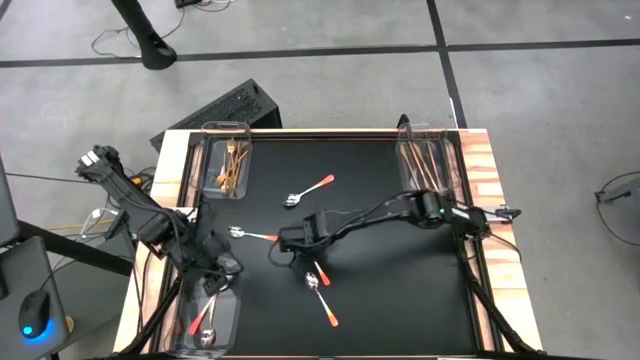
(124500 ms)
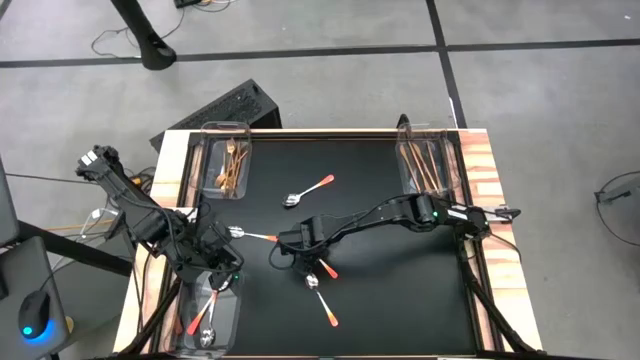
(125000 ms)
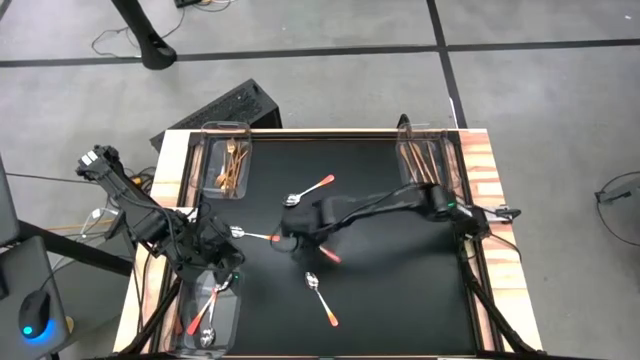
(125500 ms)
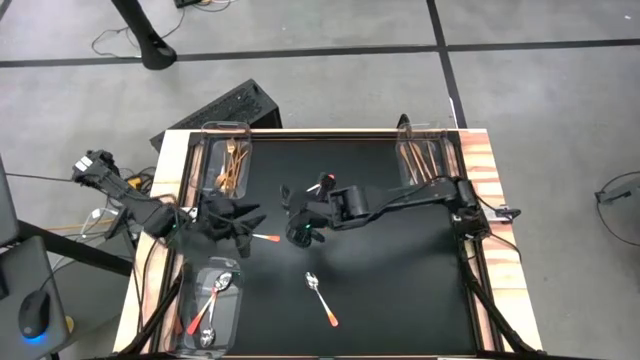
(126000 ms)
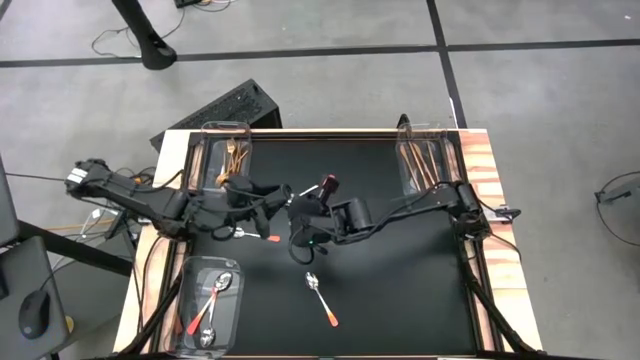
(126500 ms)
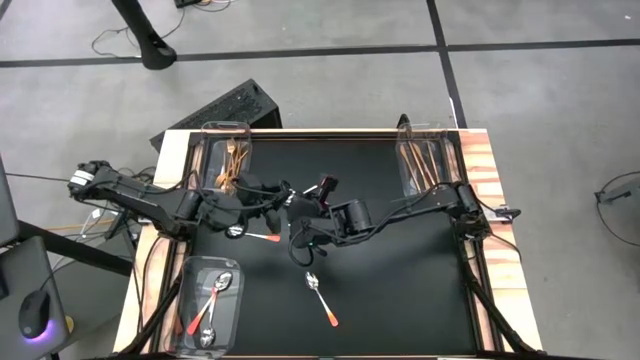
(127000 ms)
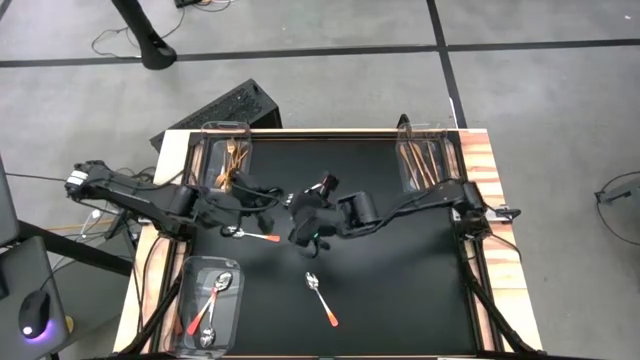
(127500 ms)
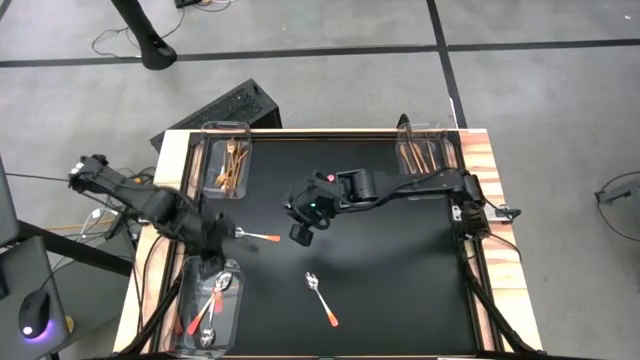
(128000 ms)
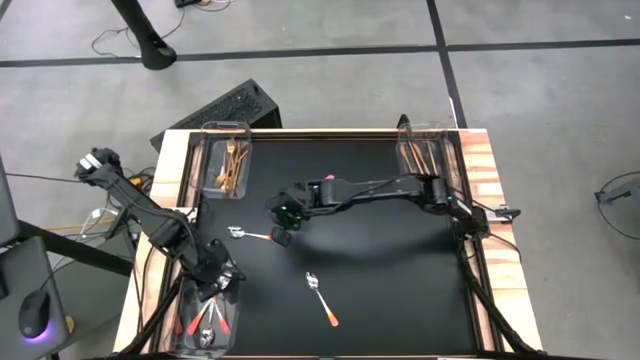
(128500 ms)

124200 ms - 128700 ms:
Task: Sort silverware by color (type)
Put the orange spoon into the bottom left transparent bin

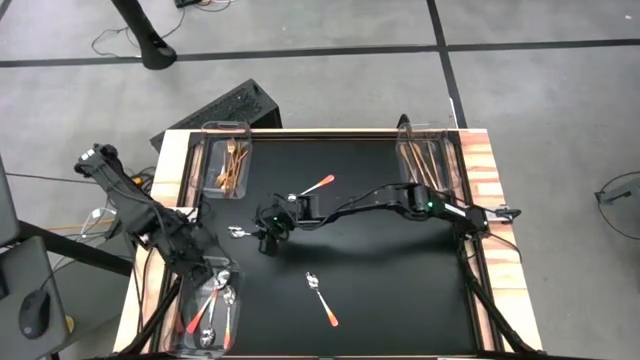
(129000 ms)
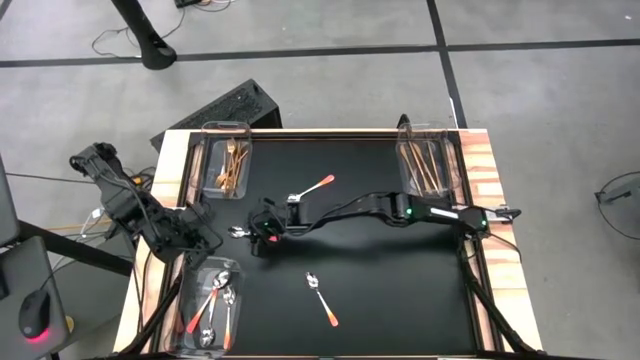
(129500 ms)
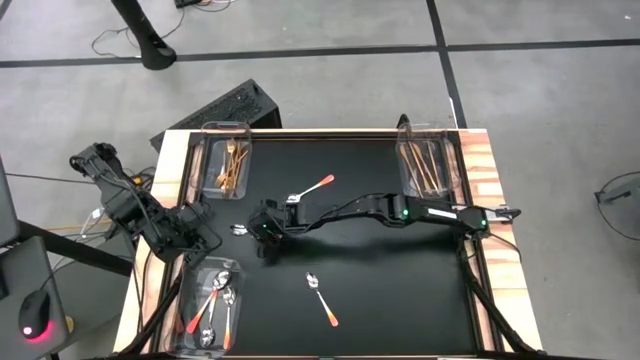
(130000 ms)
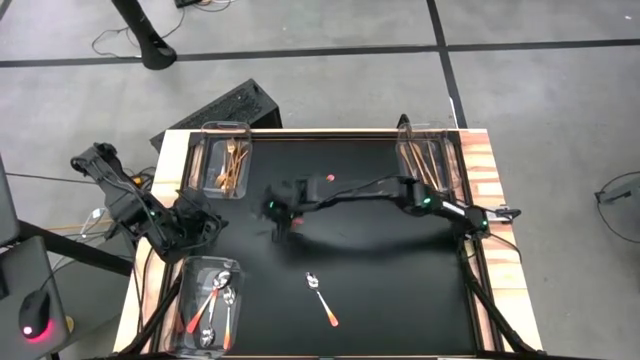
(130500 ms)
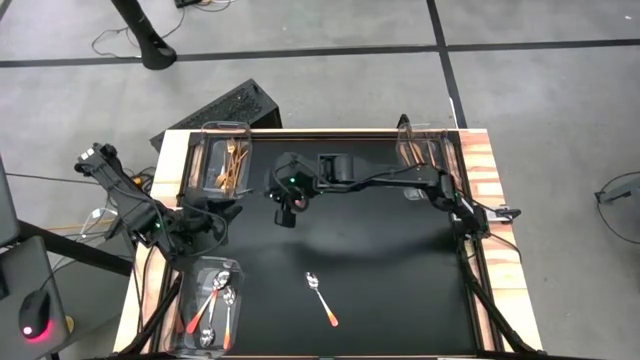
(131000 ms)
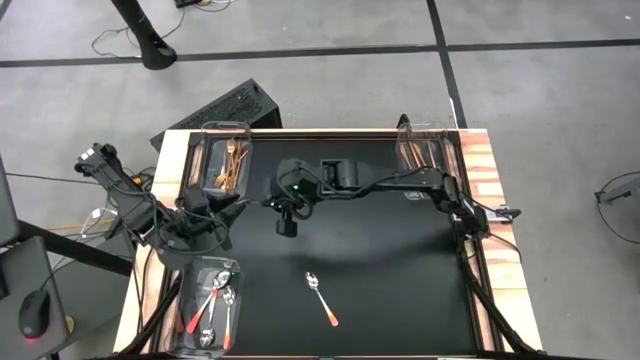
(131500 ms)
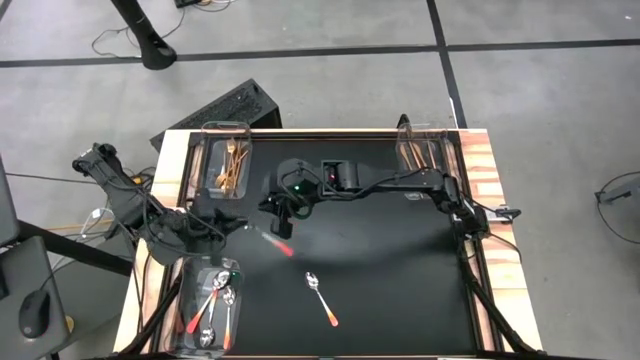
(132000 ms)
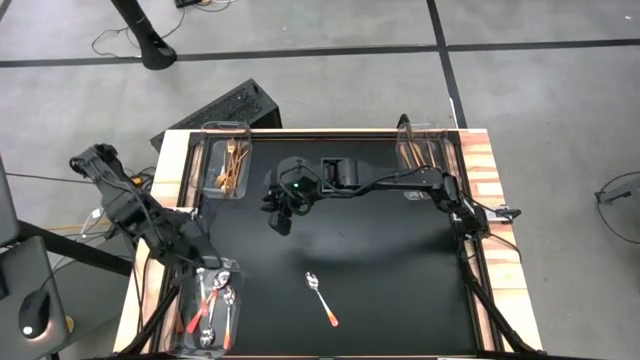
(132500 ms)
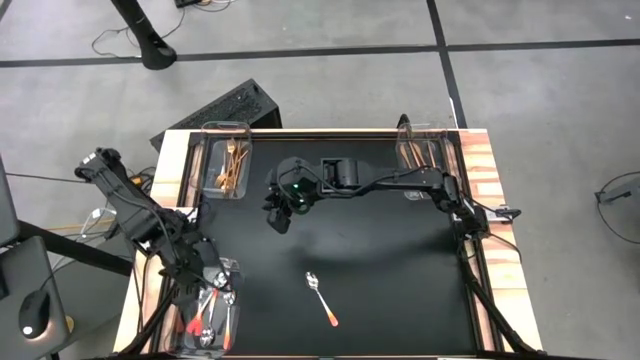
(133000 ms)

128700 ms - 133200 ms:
Put the orange spoon into the bottom left transparent bin

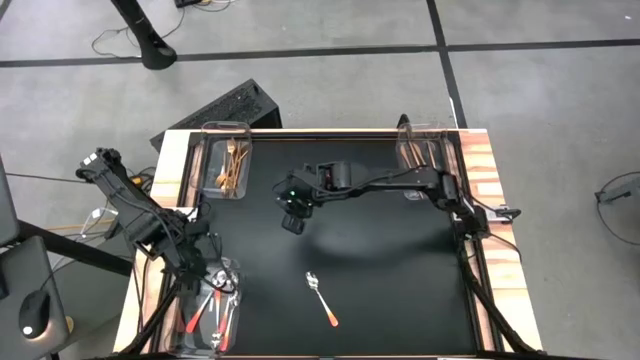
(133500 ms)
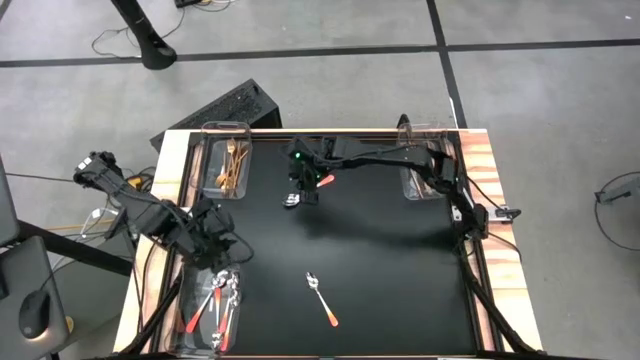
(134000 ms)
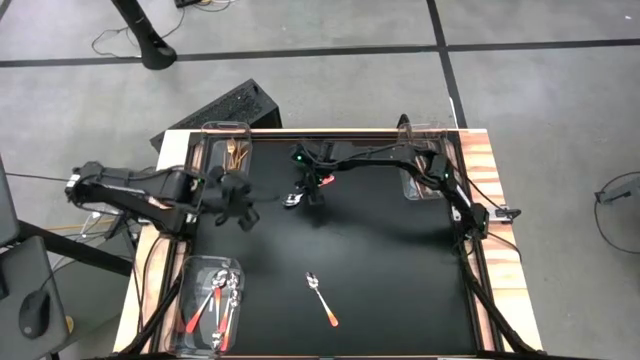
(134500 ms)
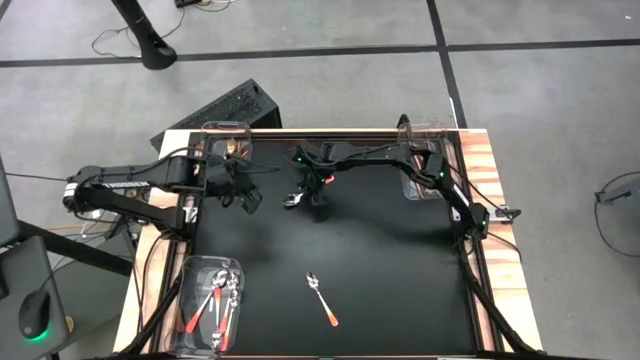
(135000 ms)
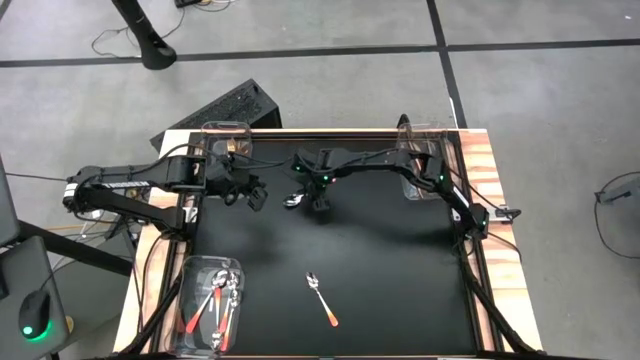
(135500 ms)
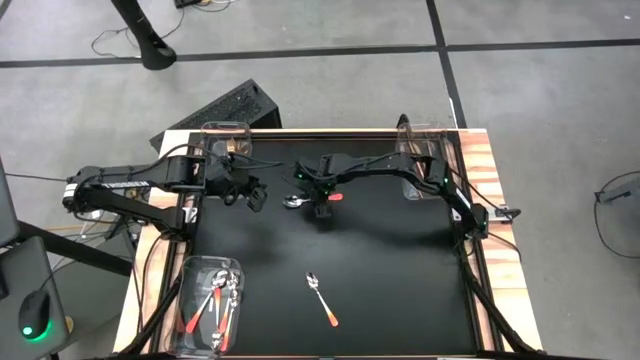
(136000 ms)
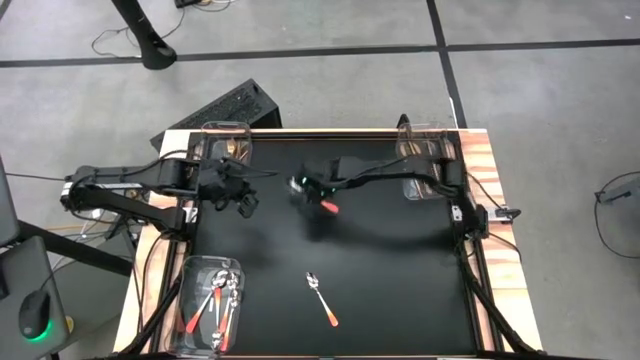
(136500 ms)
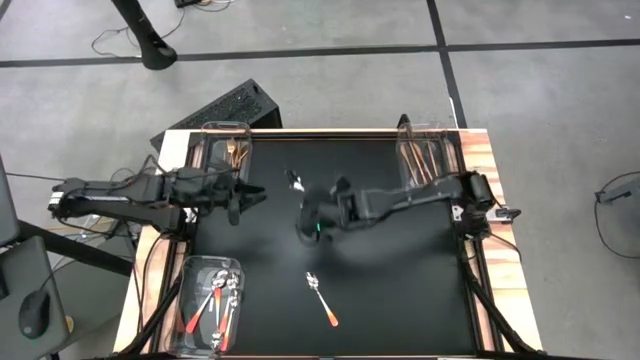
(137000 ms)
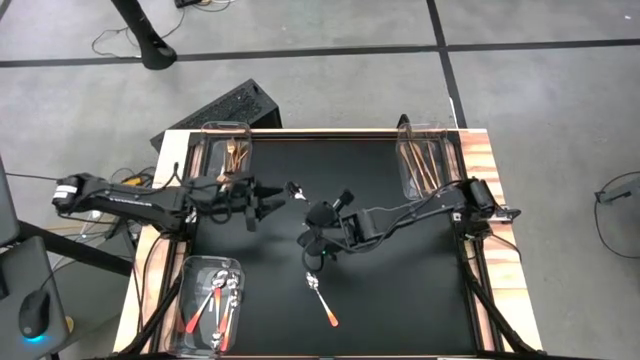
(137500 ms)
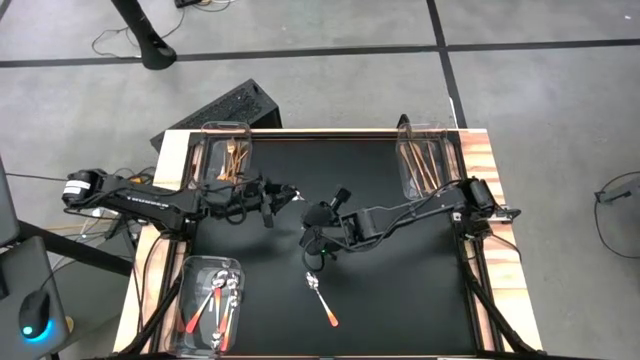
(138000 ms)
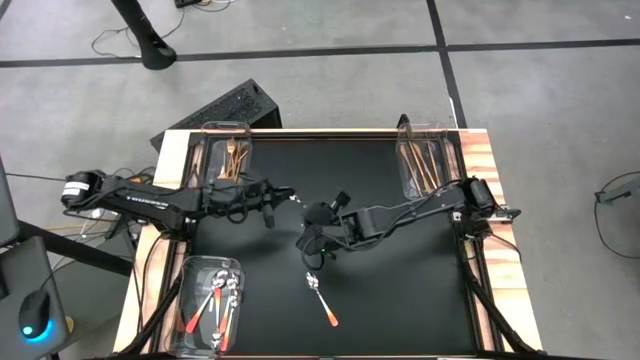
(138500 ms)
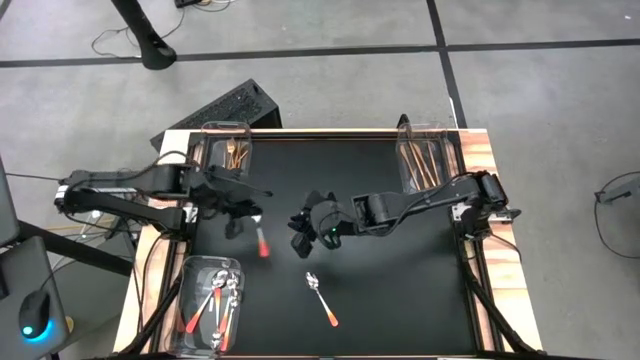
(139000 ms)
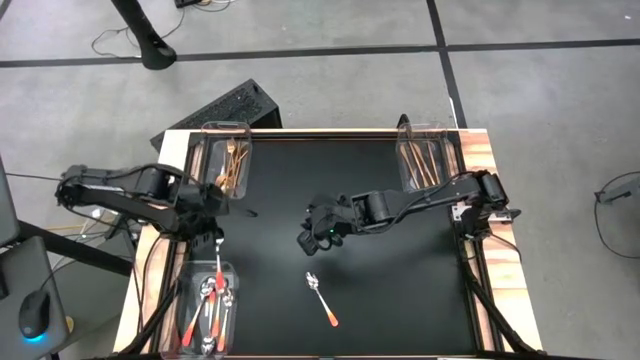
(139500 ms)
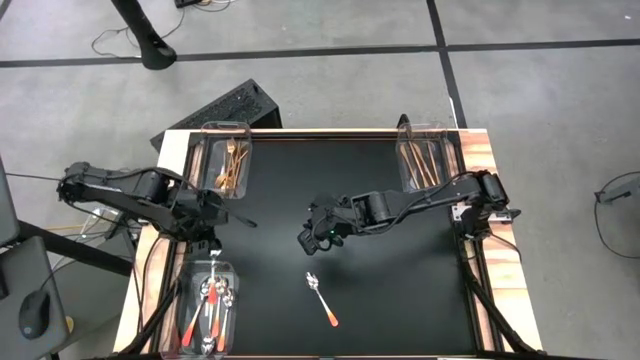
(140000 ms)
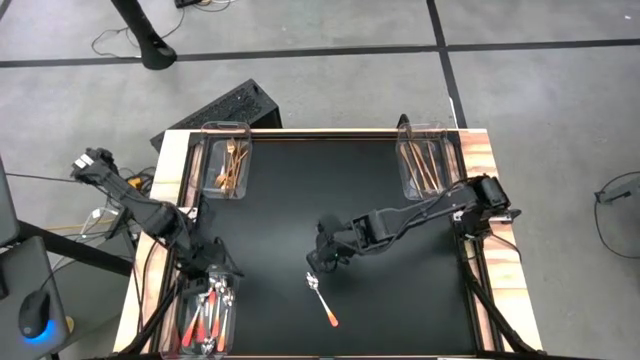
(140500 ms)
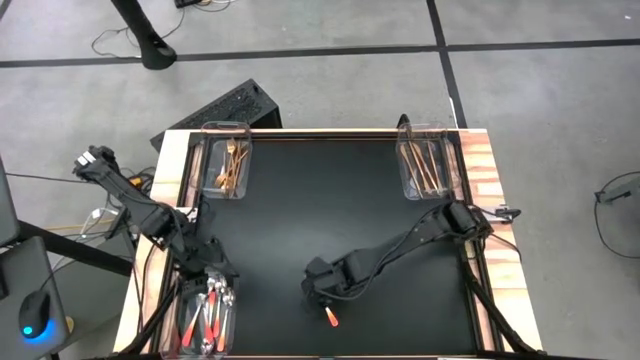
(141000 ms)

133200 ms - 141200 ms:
Put the orange spoon into the bottom left transparent bin

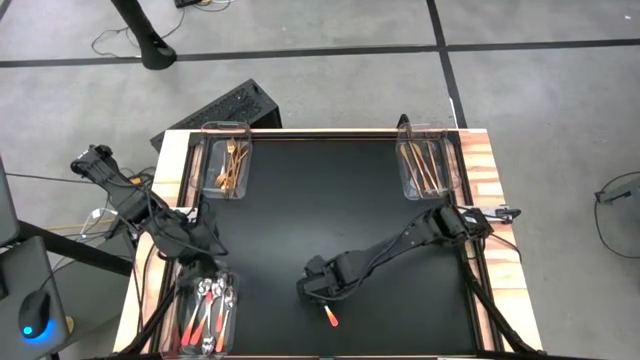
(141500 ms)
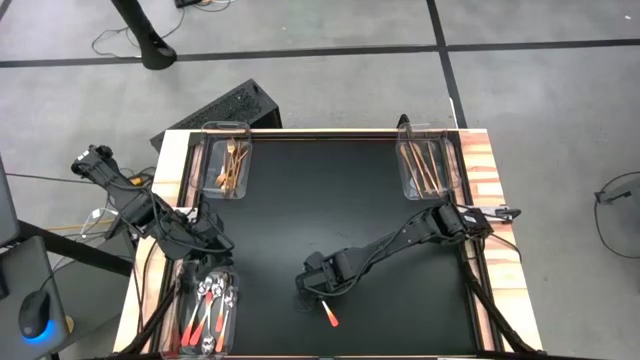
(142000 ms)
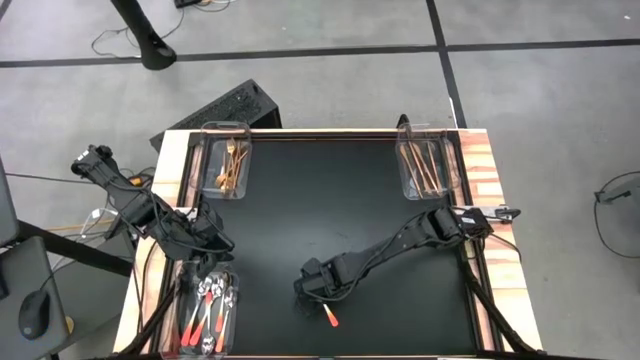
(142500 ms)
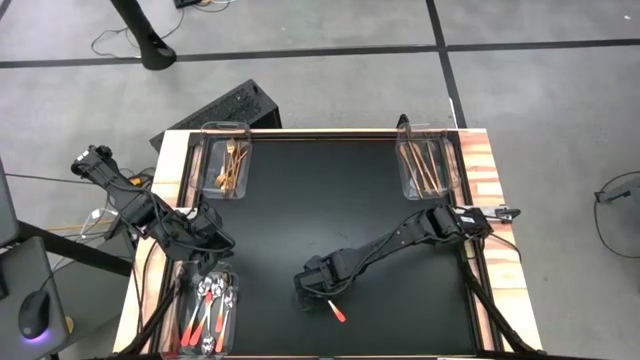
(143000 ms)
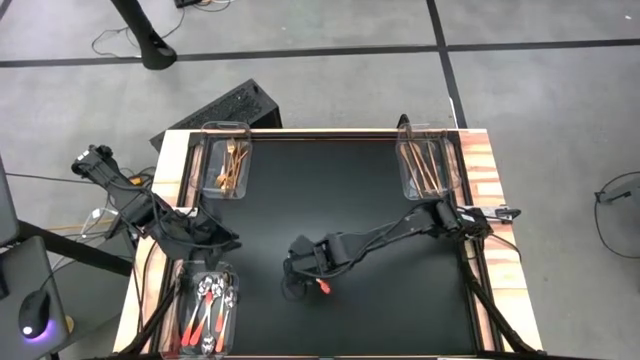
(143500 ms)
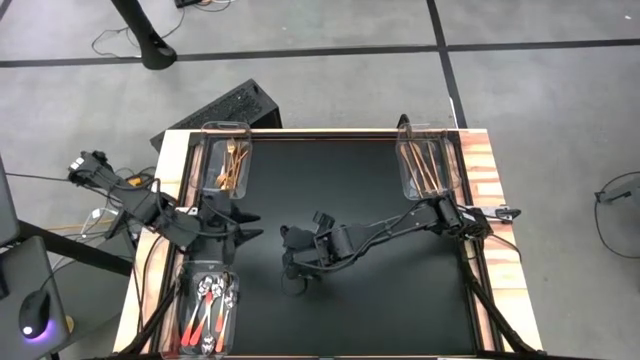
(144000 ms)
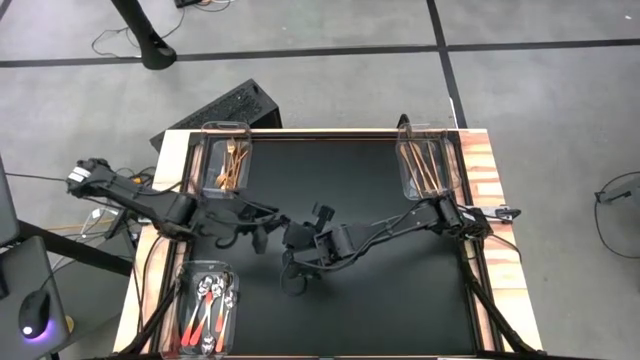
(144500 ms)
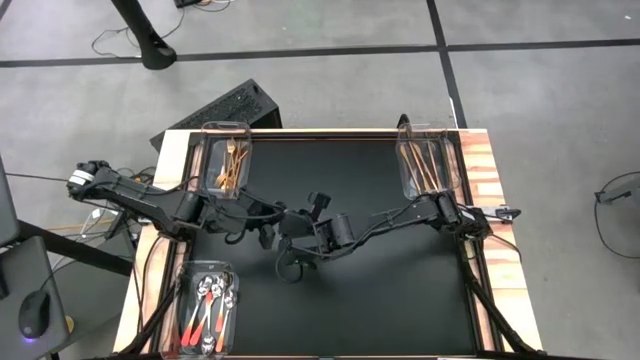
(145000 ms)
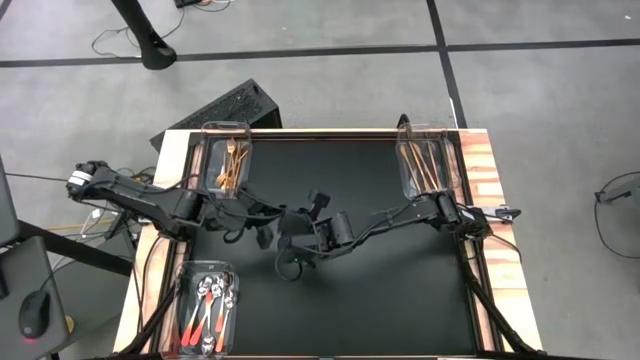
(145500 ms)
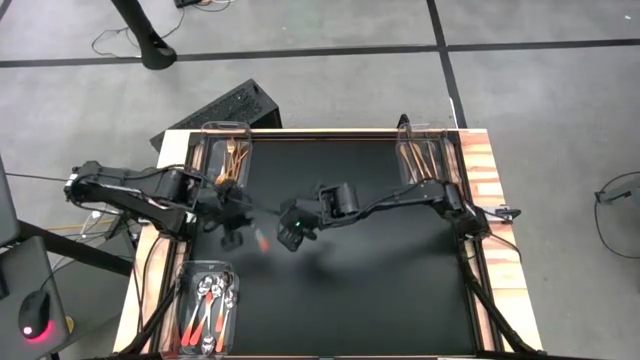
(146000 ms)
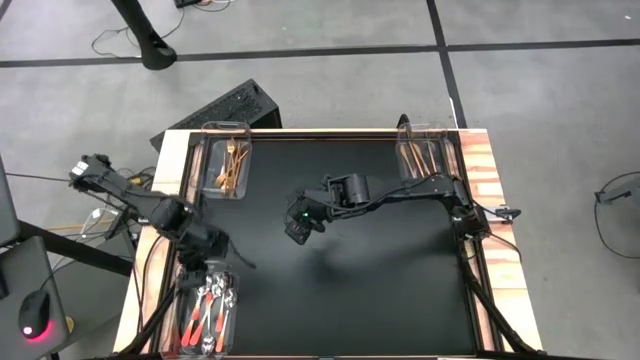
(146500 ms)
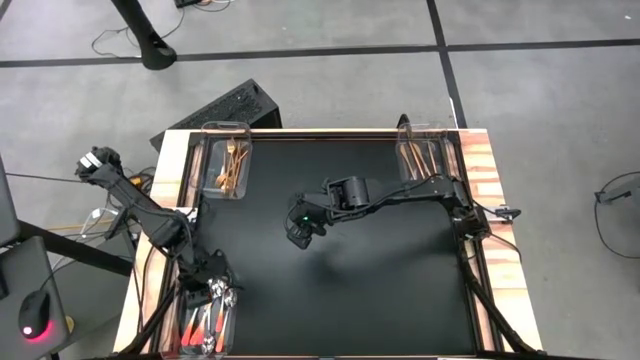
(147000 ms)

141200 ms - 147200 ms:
Put the orange spoon into the bottom left transparent bin
